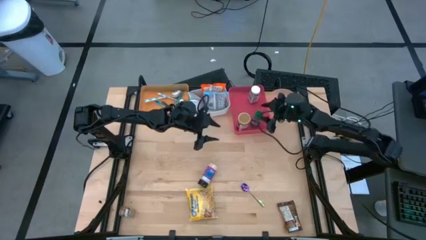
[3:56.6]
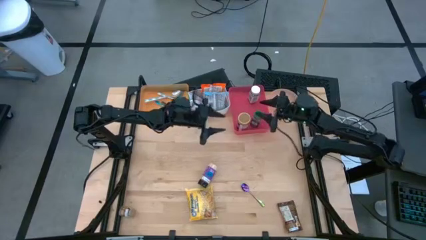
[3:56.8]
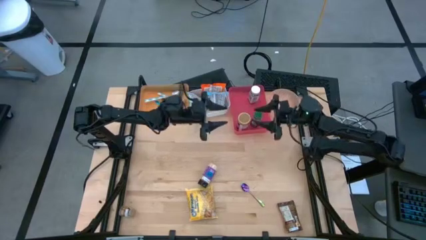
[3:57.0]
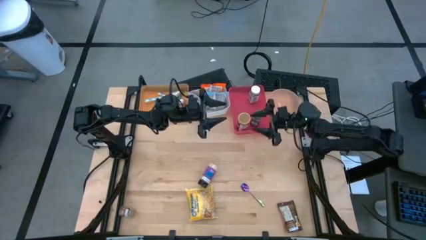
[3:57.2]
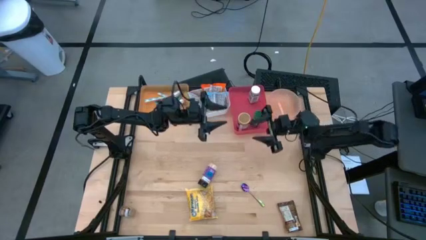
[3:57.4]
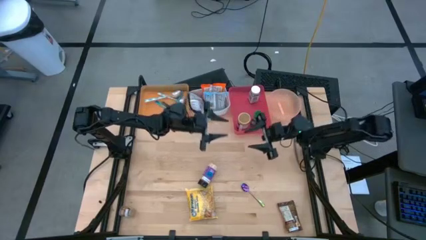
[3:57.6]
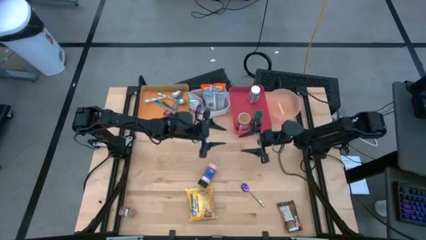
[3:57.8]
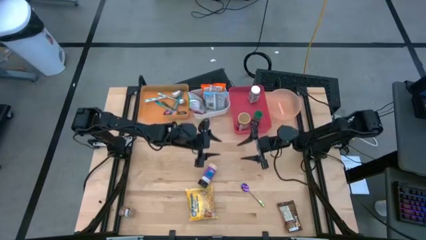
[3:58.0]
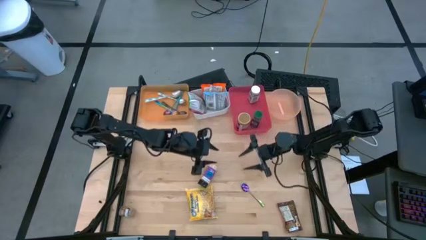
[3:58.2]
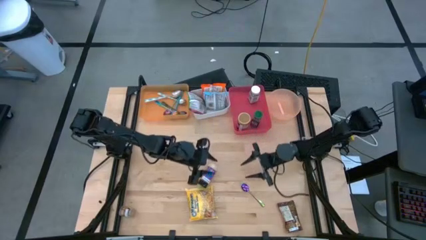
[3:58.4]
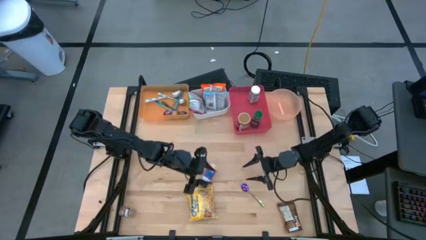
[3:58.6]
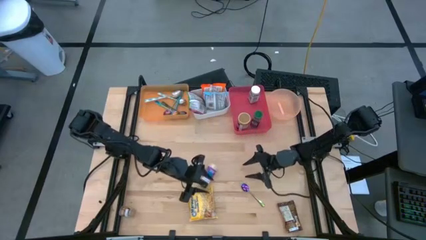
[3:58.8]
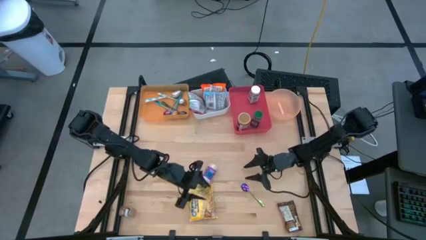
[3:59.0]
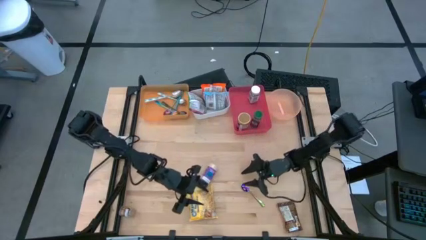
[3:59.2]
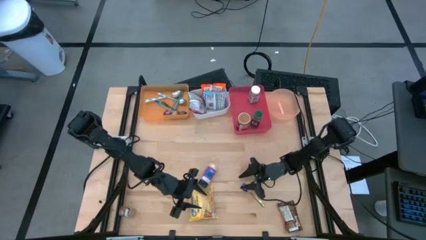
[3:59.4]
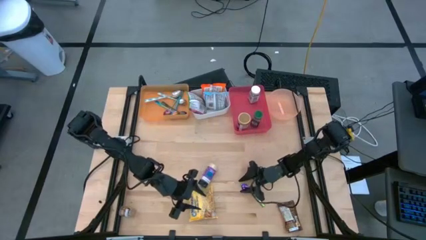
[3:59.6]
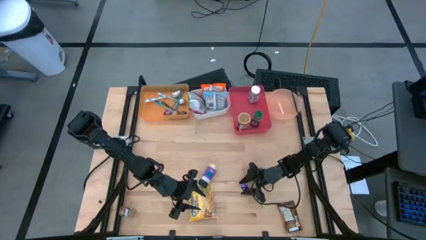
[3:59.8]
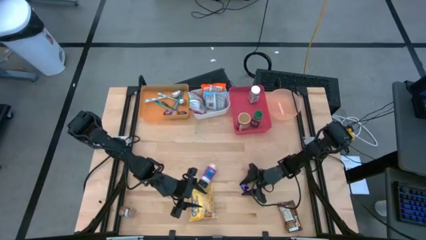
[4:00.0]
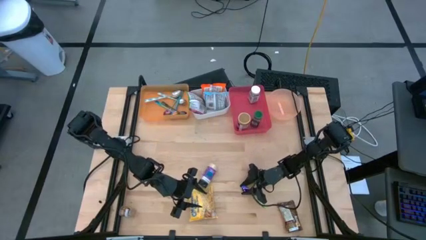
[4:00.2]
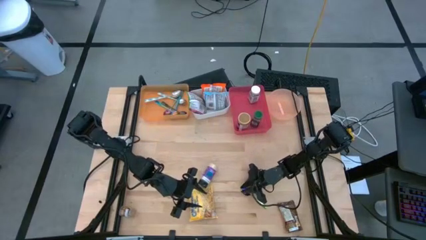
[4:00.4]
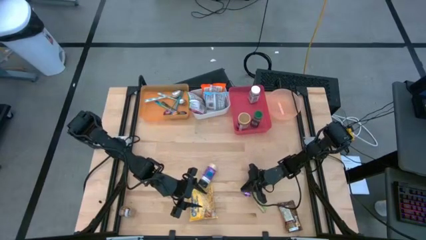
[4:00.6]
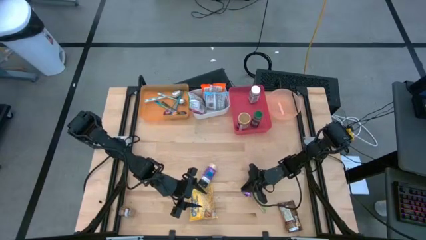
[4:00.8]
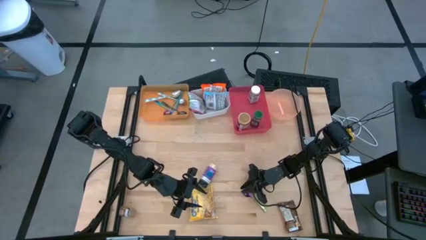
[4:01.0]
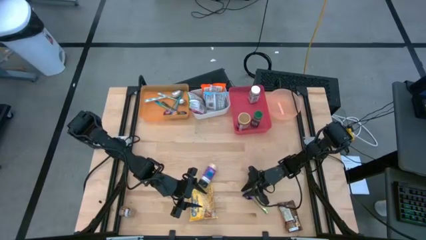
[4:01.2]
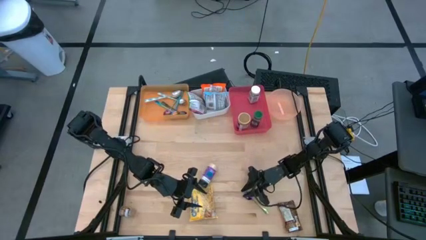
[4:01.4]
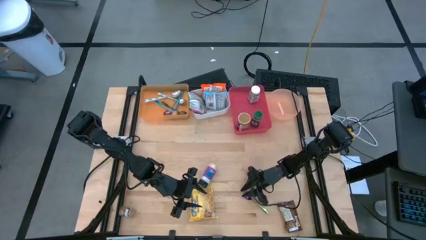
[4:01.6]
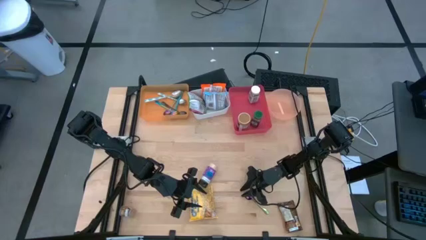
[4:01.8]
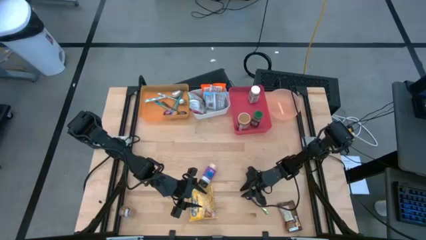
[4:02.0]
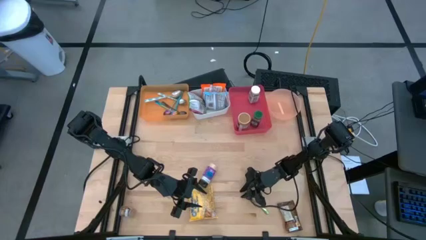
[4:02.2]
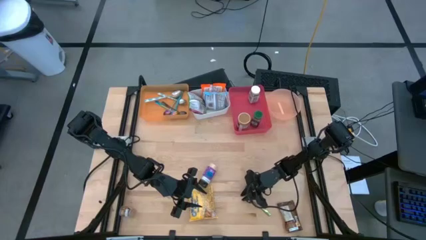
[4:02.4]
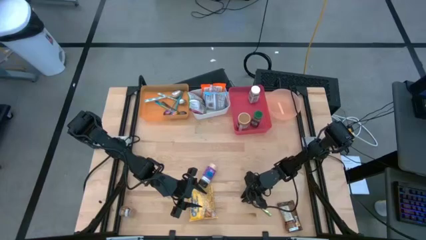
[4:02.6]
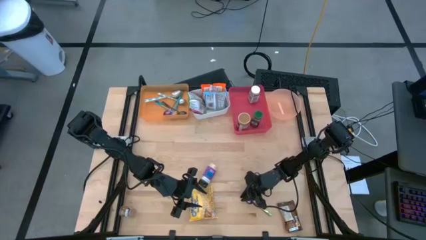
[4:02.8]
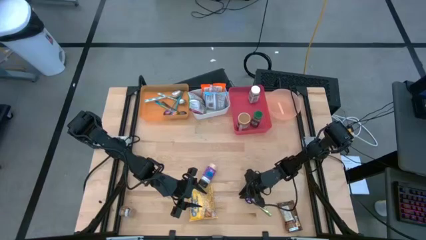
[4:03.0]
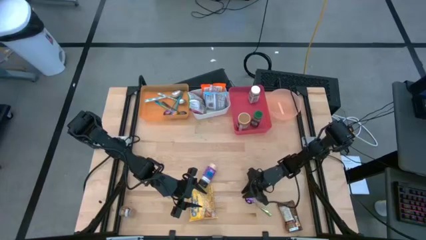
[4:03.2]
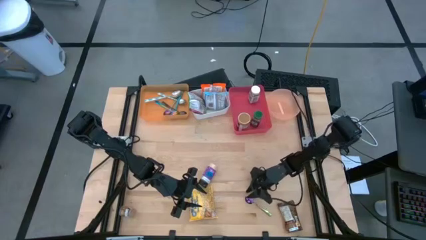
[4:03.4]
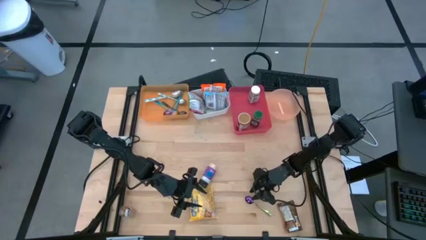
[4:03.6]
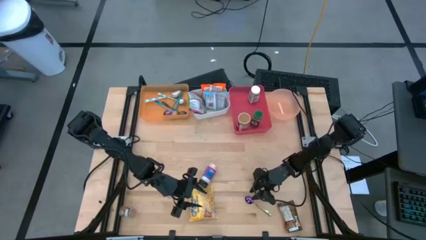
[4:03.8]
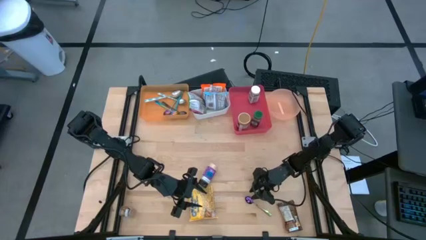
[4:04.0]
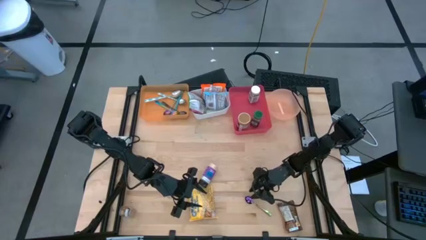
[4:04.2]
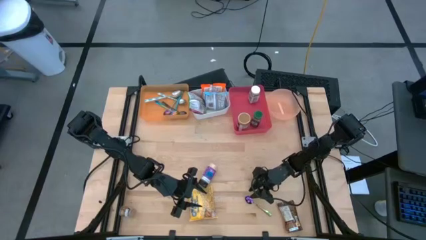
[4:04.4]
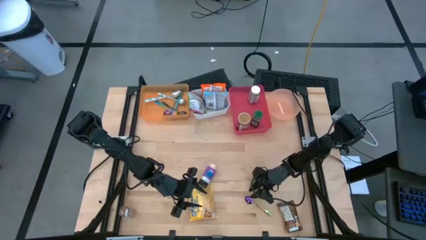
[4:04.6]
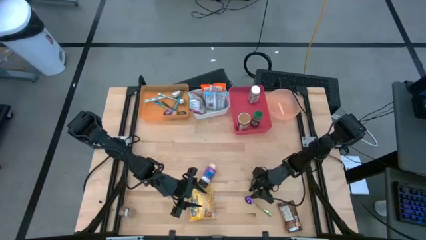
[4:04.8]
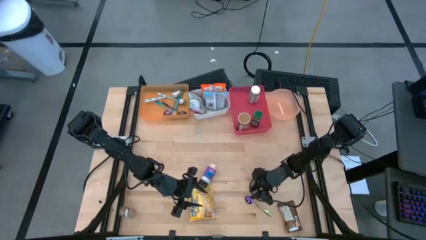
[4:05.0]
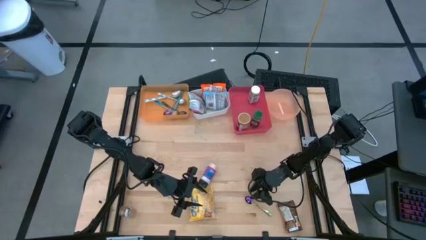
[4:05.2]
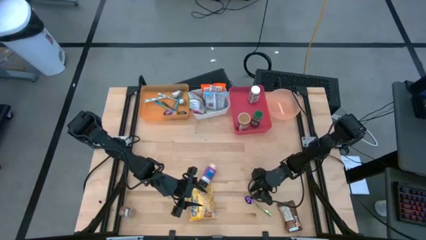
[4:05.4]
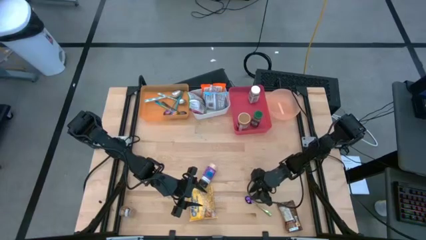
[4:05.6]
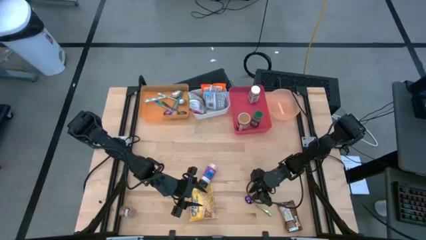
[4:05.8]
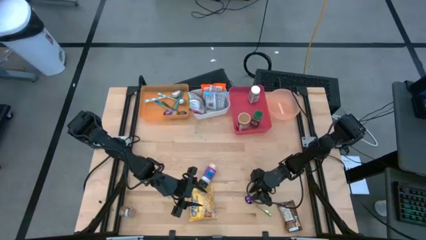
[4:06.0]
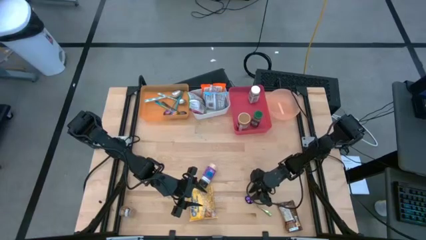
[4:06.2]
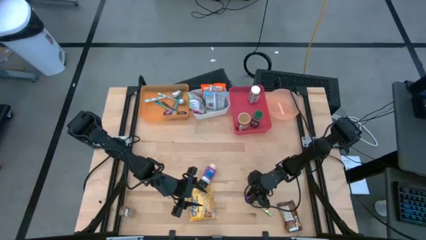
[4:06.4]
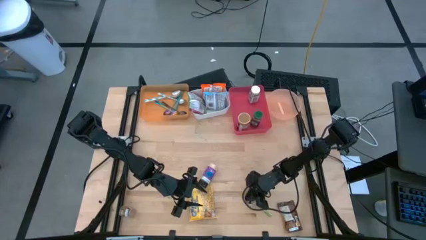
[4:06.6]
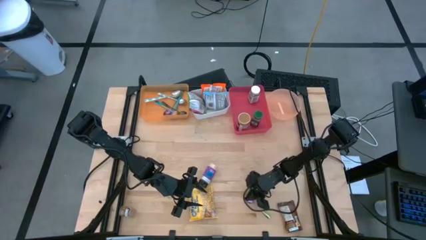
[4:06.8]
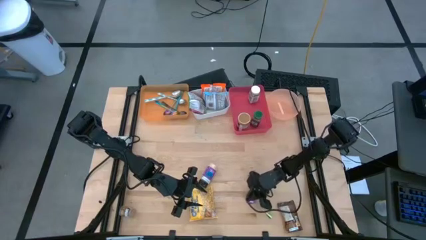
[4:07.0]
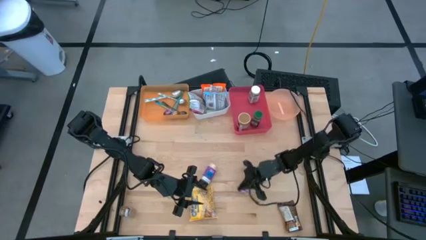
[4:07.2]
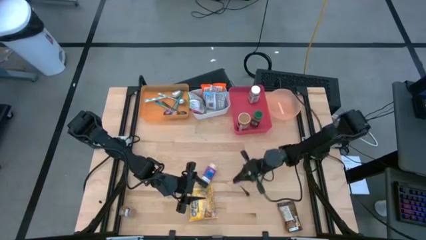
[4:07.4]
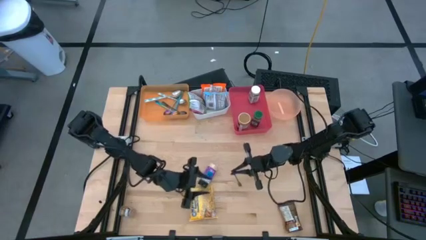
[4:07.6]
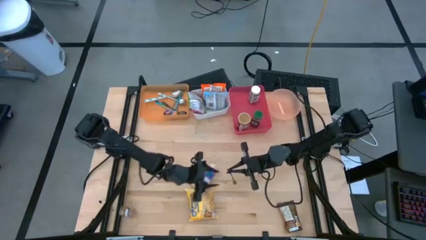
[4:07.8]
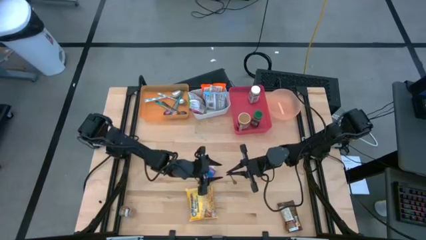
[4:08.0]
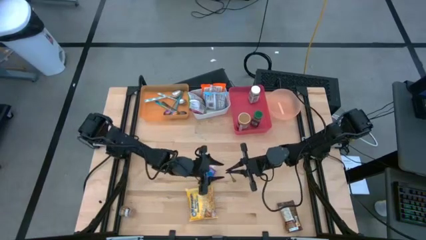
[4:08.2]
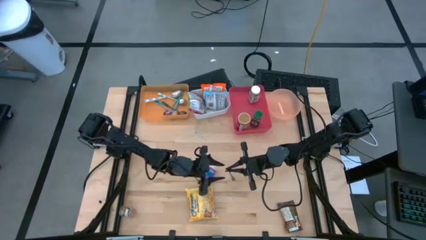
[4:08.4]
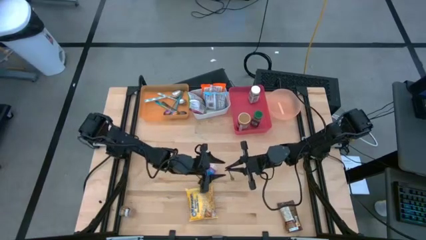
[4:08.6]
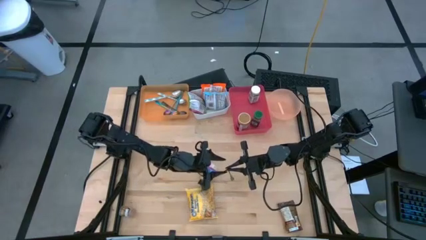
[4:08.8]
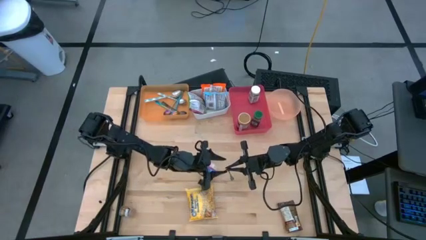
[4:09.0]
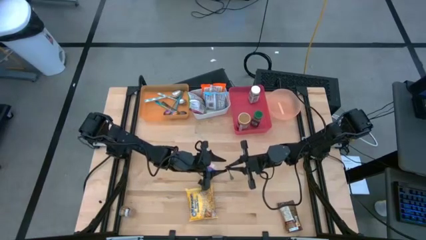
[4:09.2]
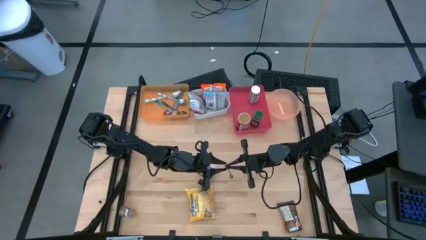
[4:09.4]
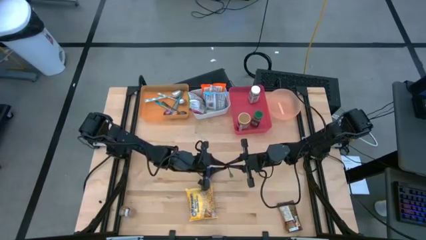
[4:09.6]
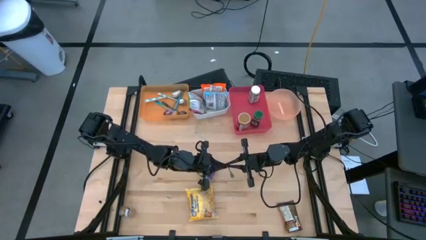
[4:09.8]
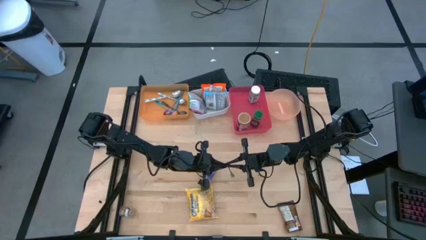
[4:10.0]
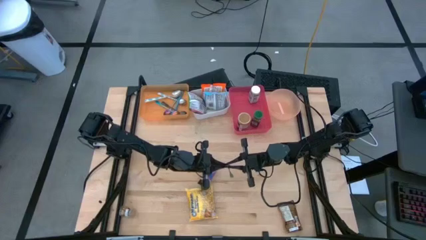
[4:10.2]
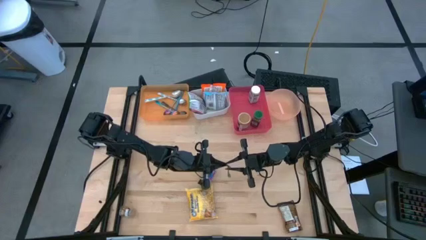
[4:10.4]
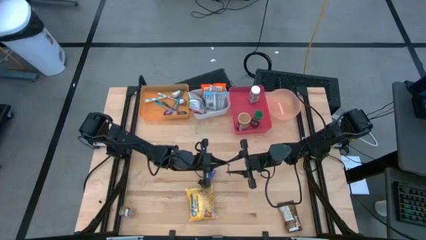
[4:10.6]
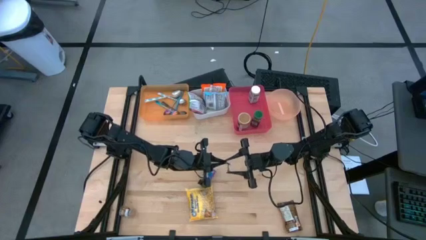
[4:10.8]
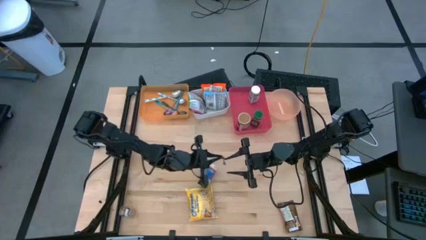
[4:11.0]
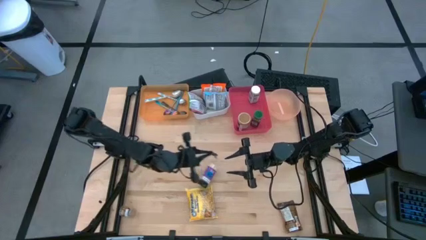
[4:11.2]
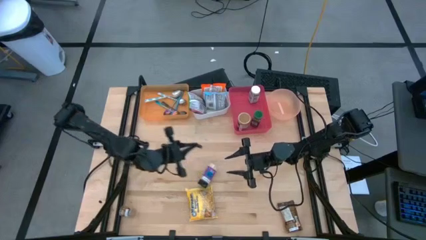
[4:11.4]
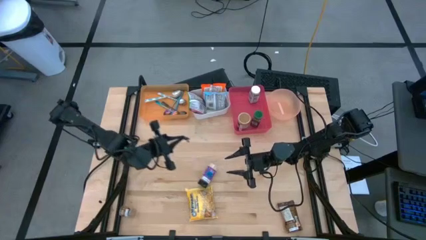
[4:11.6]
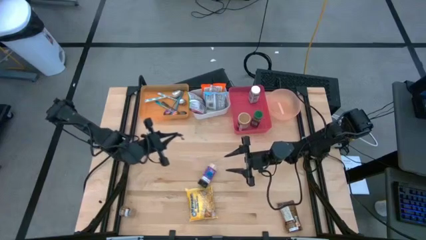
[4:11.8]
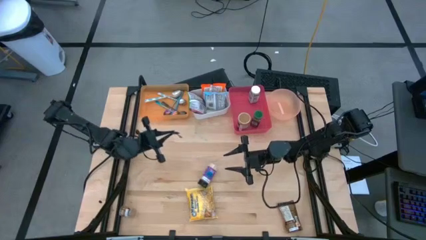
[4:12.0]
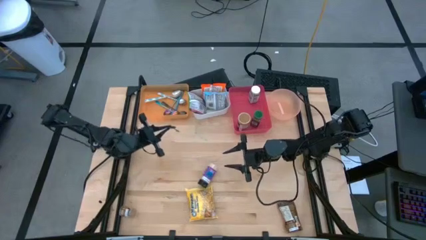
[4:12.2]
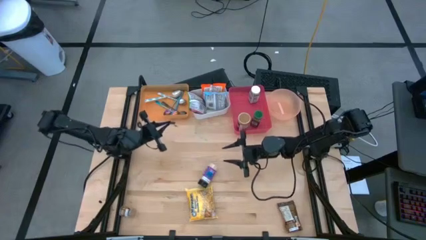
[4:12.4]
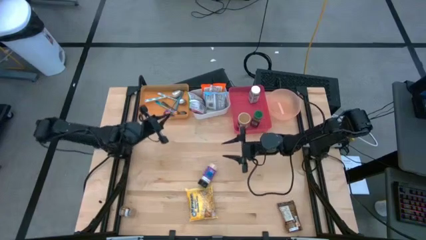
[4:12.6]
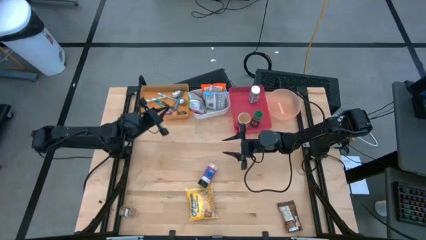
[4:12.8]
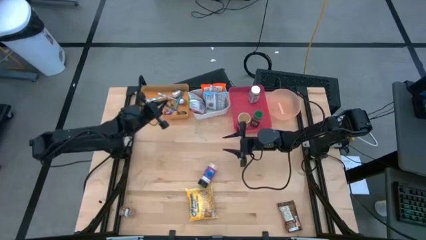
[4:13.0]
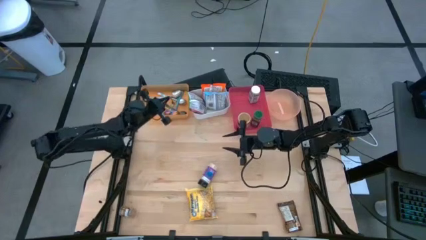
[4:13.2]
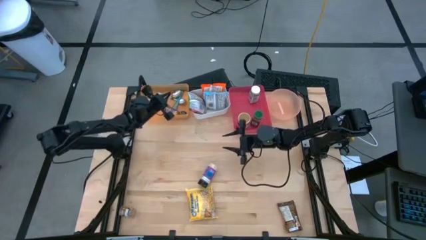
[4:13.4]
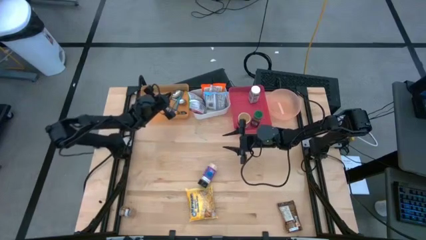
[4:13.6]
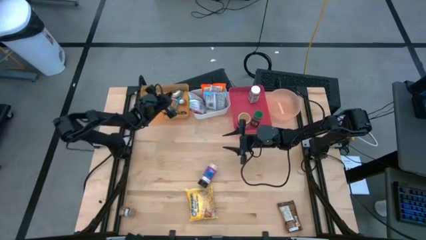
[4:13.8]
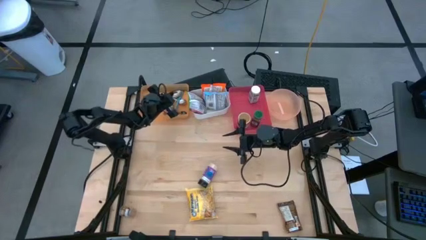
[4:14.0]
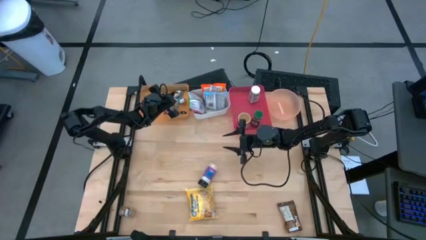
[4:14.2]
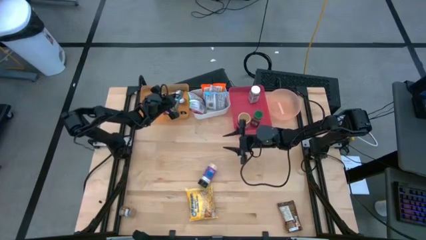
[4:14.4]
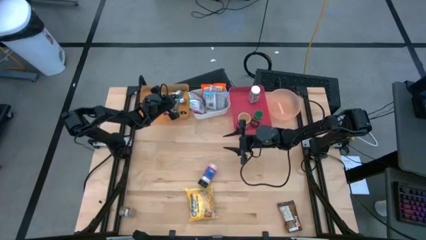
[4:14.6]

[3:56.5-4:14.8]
Task: Pick & Place Food Item
Put the purple spoon into the orange bin
